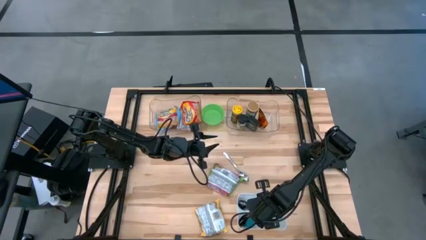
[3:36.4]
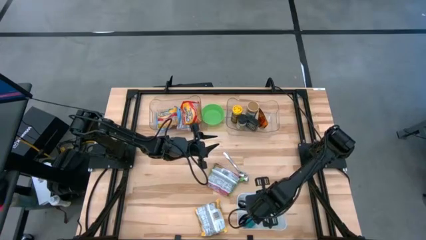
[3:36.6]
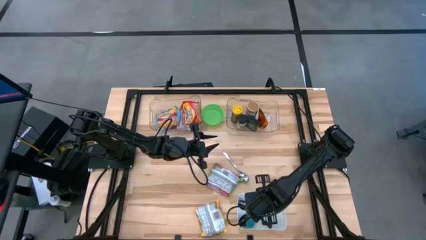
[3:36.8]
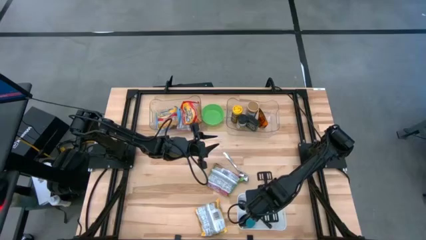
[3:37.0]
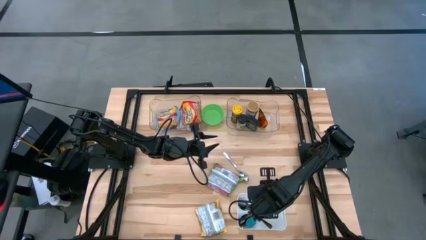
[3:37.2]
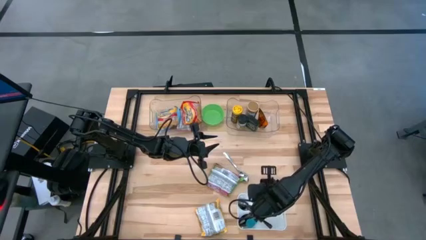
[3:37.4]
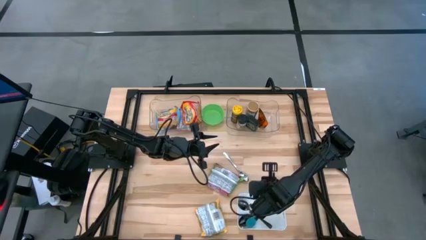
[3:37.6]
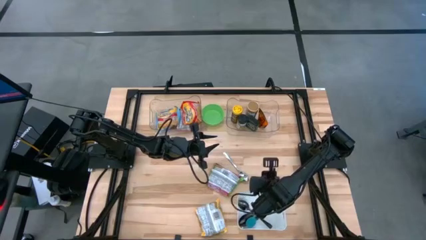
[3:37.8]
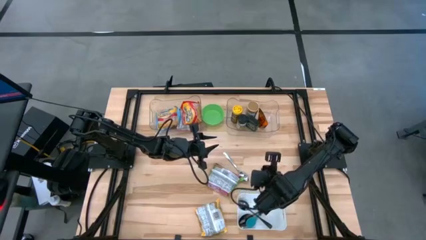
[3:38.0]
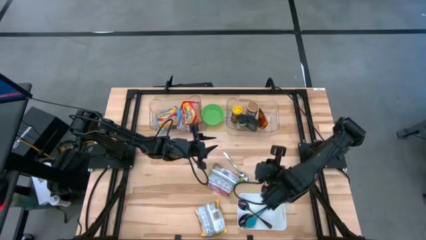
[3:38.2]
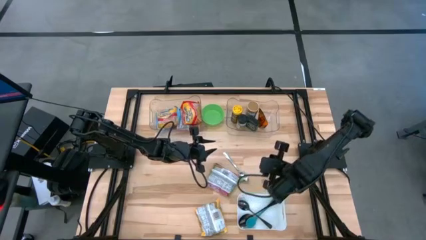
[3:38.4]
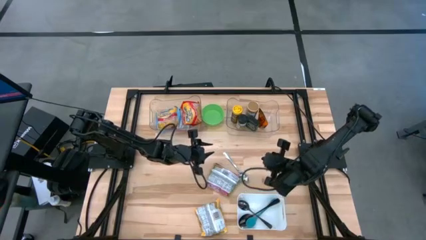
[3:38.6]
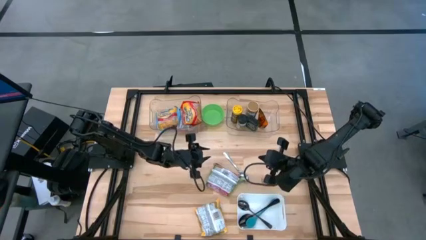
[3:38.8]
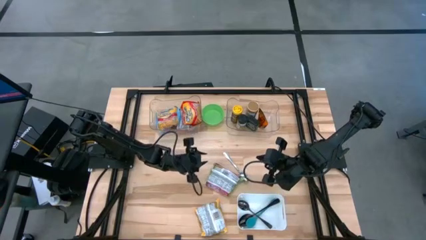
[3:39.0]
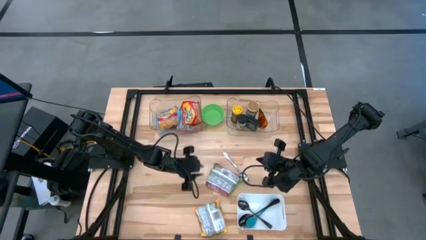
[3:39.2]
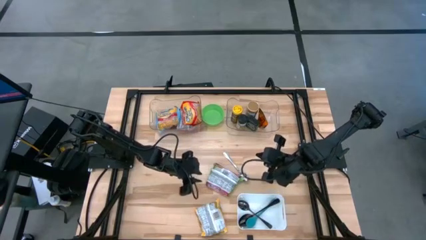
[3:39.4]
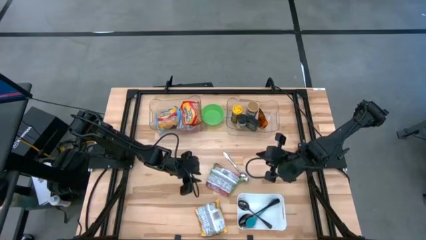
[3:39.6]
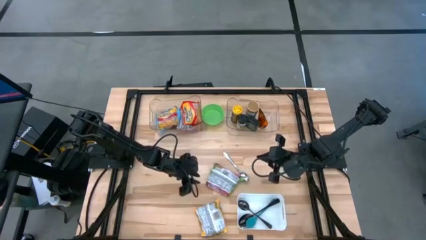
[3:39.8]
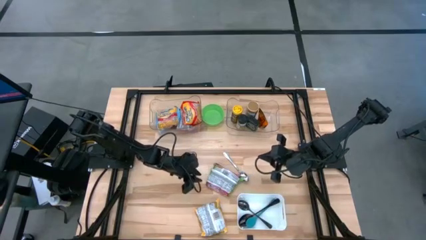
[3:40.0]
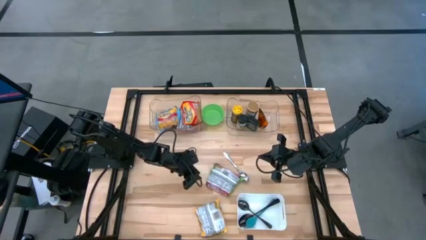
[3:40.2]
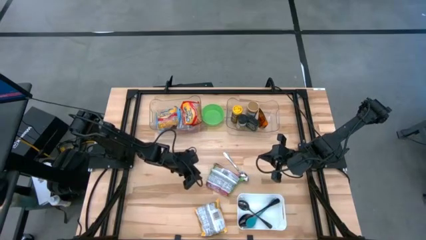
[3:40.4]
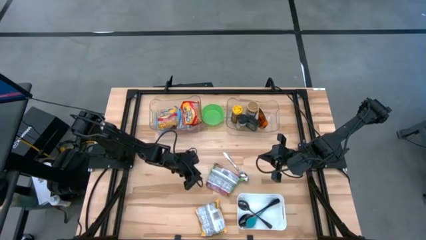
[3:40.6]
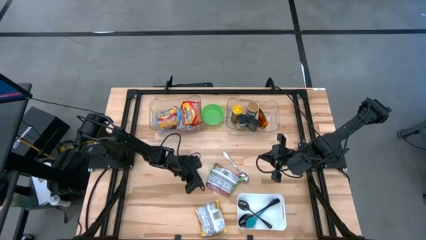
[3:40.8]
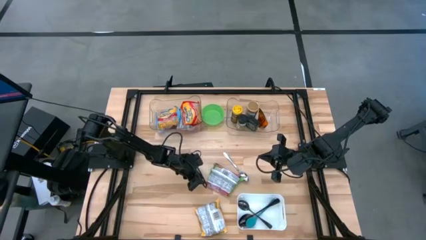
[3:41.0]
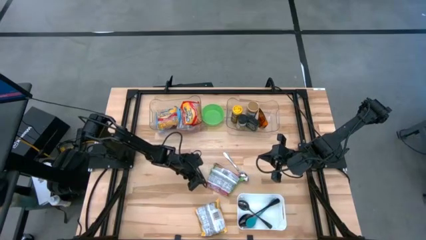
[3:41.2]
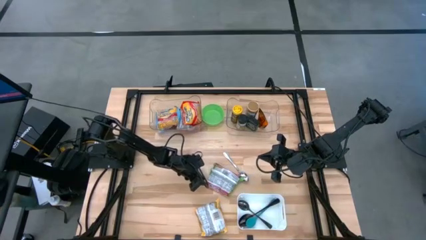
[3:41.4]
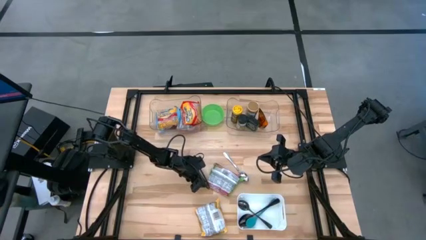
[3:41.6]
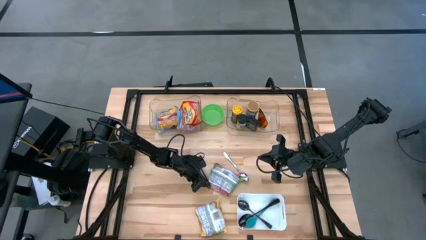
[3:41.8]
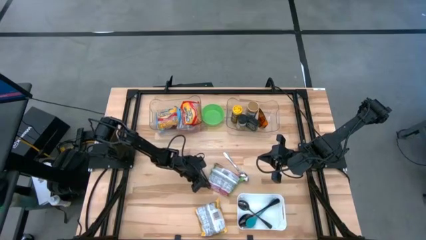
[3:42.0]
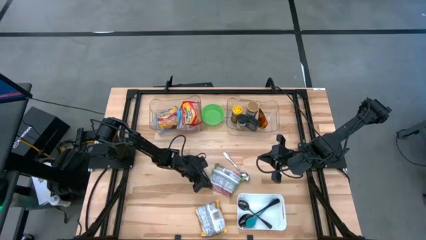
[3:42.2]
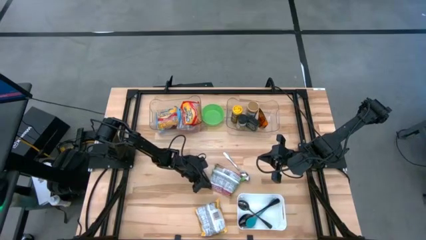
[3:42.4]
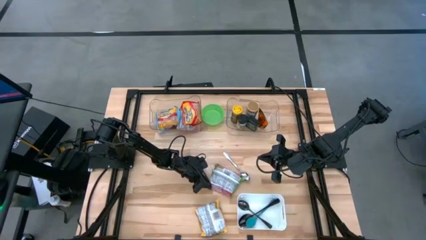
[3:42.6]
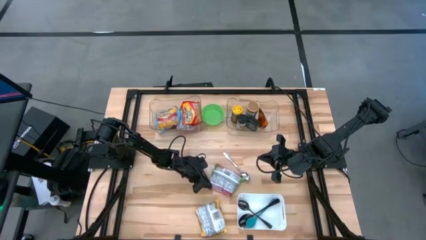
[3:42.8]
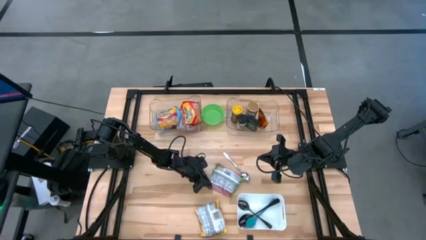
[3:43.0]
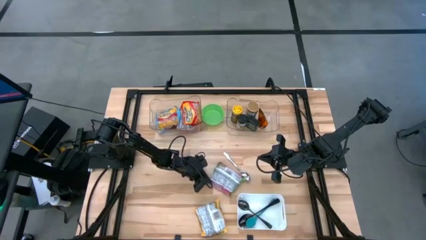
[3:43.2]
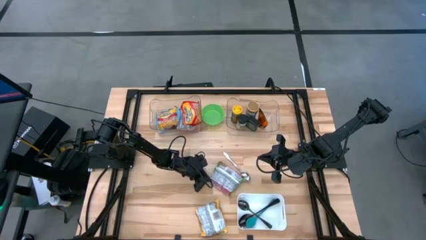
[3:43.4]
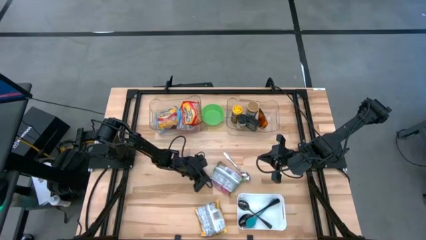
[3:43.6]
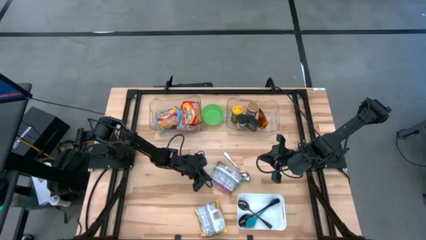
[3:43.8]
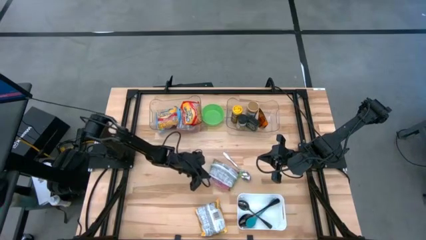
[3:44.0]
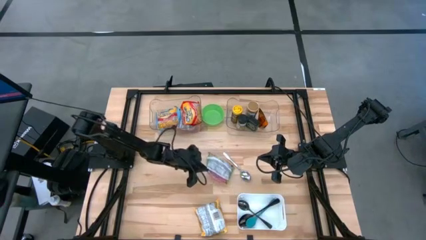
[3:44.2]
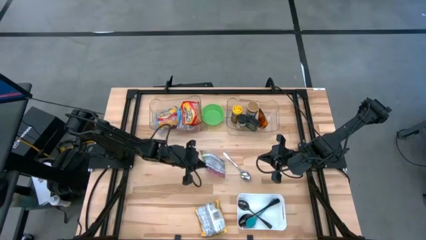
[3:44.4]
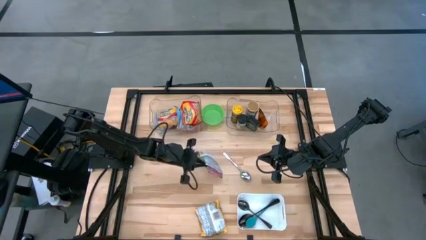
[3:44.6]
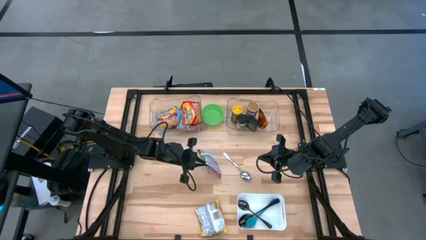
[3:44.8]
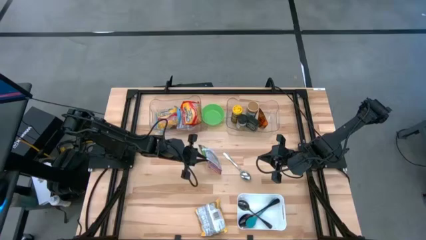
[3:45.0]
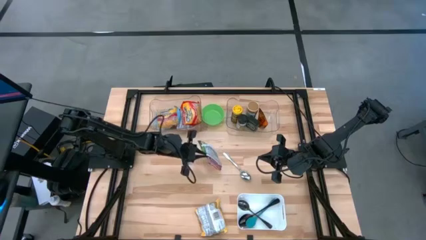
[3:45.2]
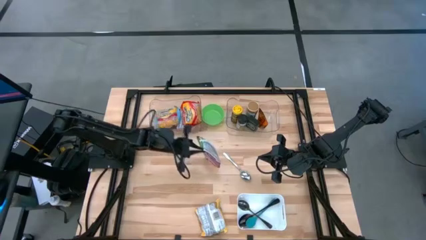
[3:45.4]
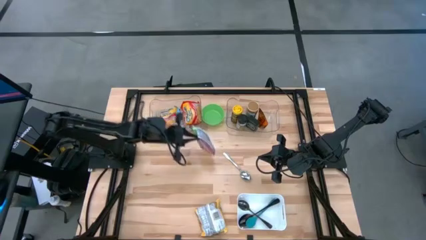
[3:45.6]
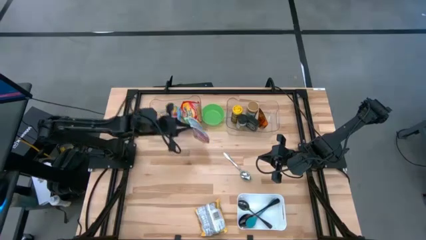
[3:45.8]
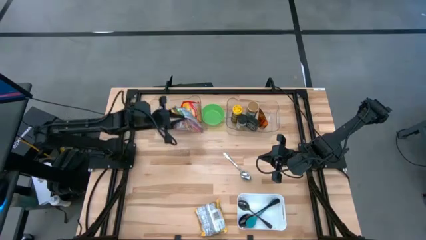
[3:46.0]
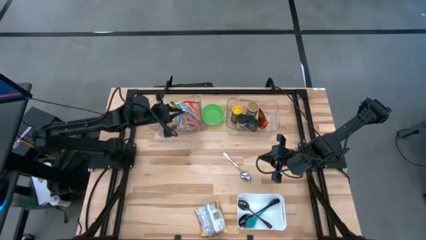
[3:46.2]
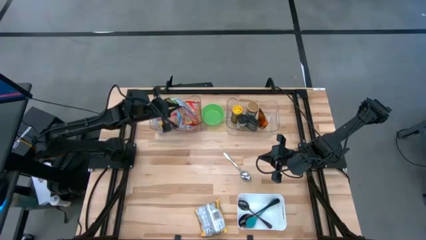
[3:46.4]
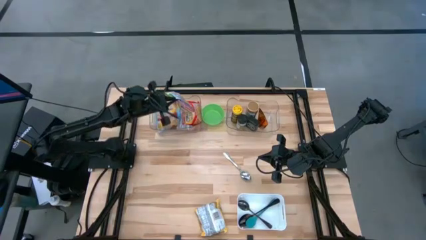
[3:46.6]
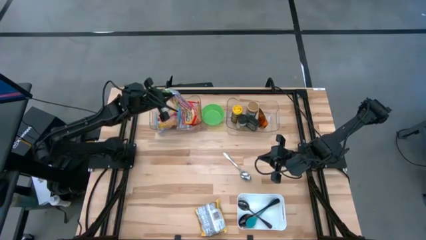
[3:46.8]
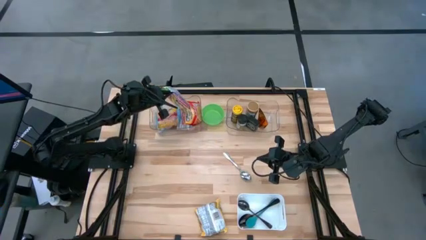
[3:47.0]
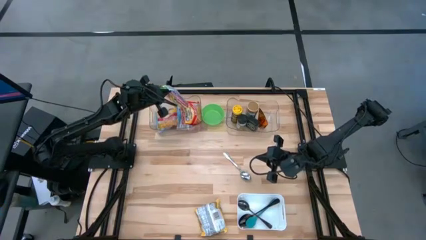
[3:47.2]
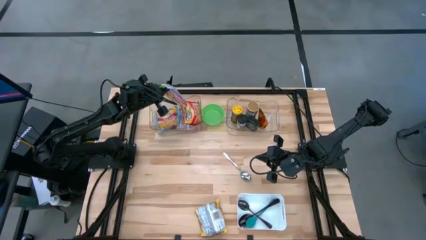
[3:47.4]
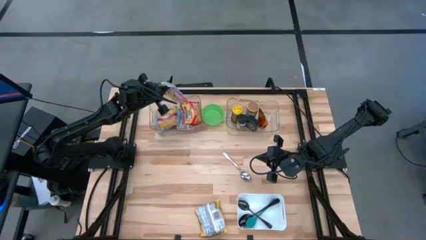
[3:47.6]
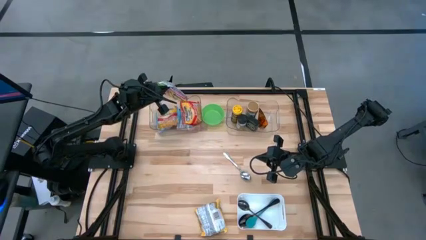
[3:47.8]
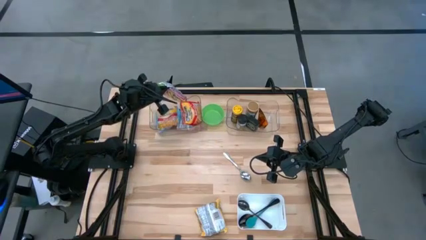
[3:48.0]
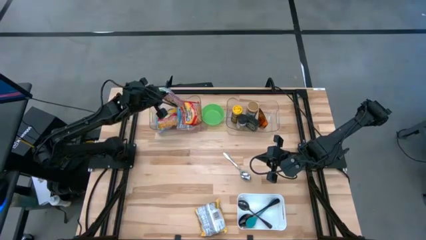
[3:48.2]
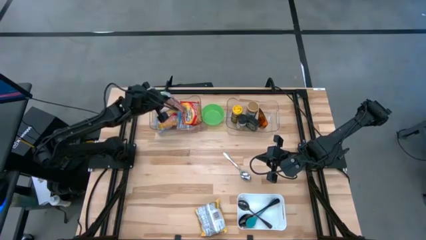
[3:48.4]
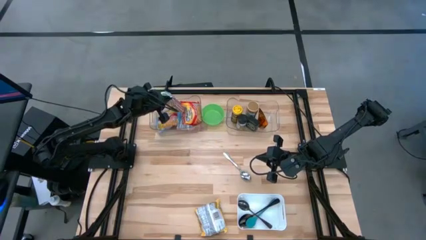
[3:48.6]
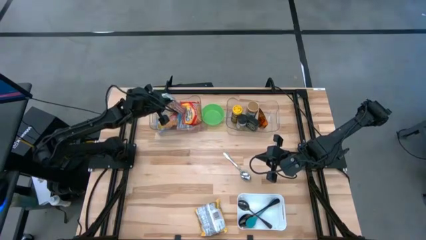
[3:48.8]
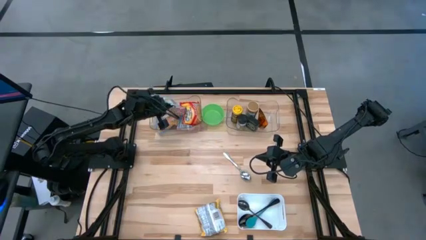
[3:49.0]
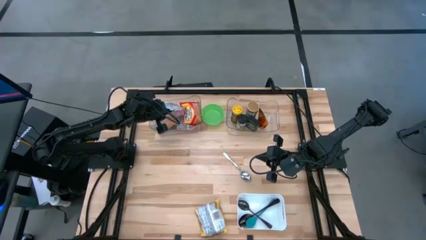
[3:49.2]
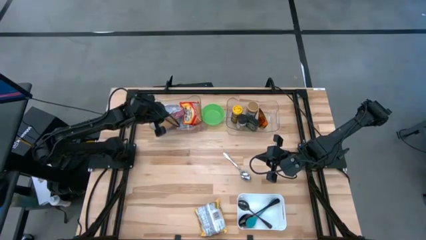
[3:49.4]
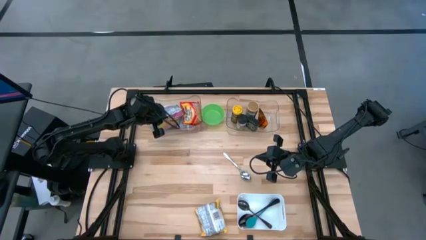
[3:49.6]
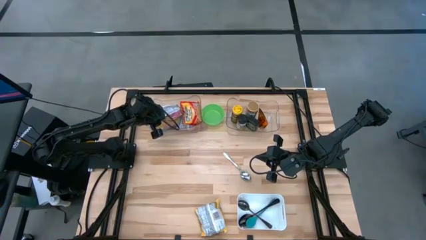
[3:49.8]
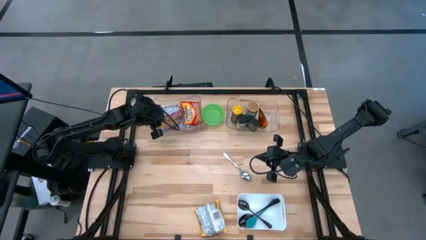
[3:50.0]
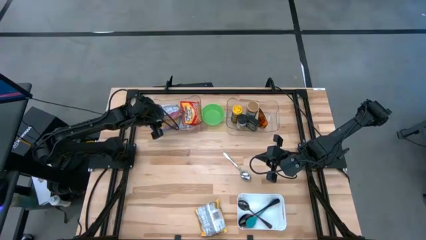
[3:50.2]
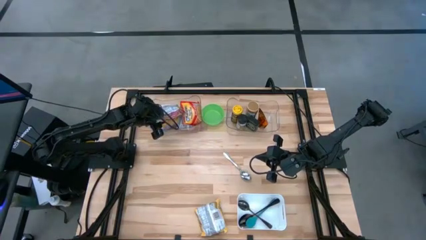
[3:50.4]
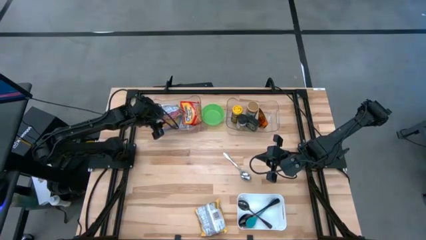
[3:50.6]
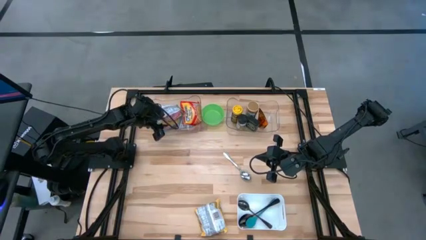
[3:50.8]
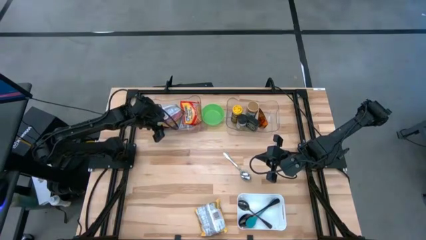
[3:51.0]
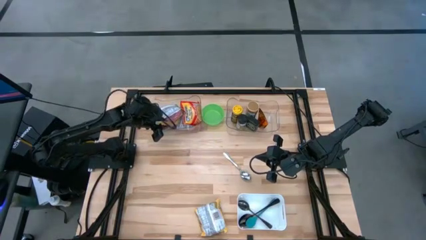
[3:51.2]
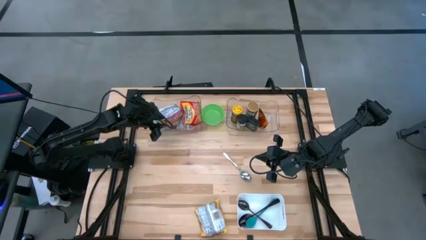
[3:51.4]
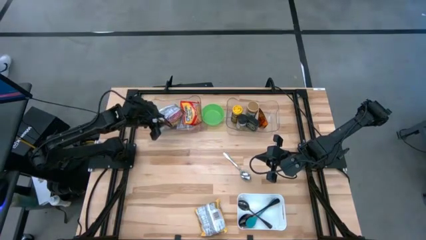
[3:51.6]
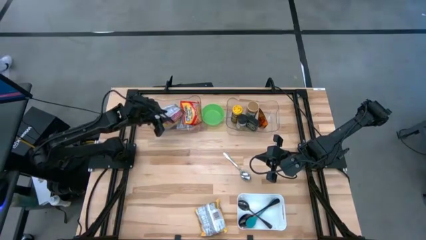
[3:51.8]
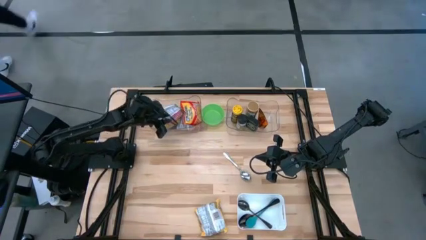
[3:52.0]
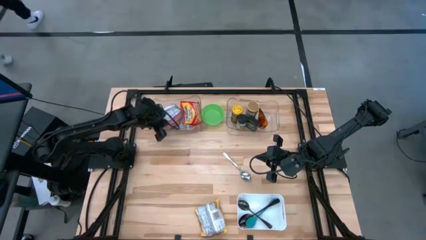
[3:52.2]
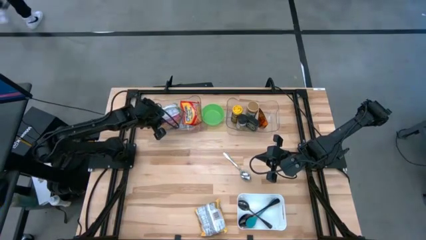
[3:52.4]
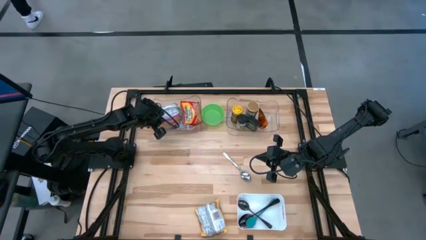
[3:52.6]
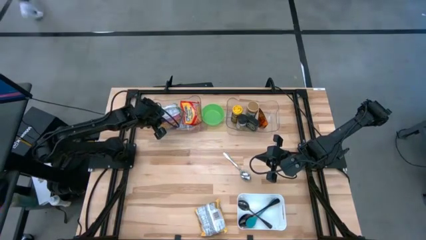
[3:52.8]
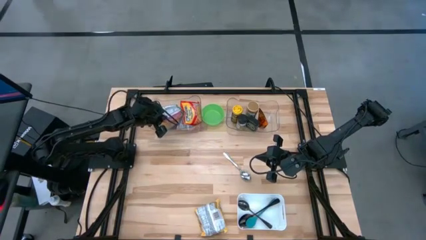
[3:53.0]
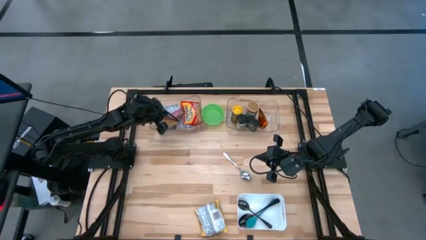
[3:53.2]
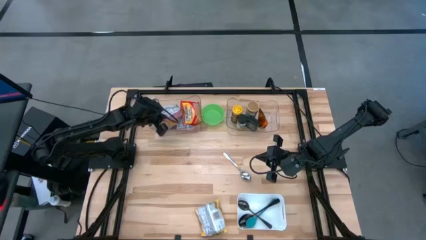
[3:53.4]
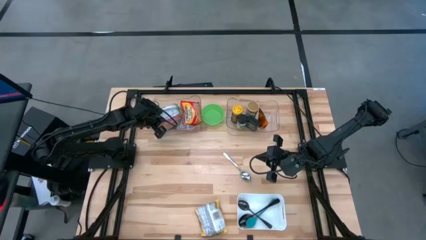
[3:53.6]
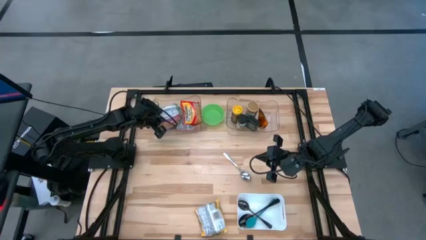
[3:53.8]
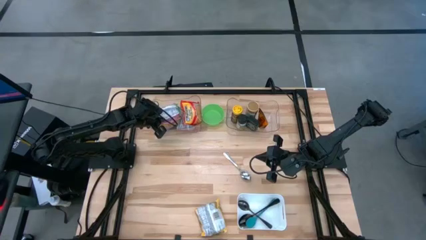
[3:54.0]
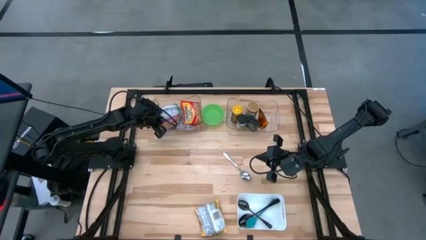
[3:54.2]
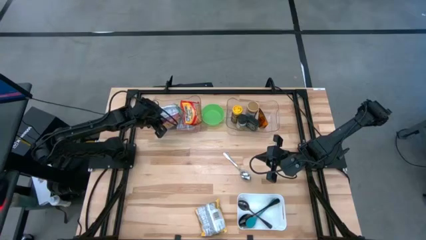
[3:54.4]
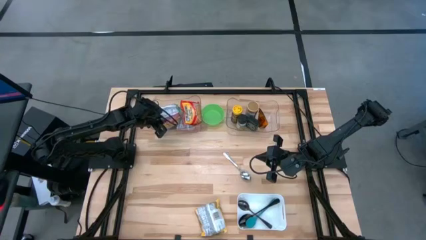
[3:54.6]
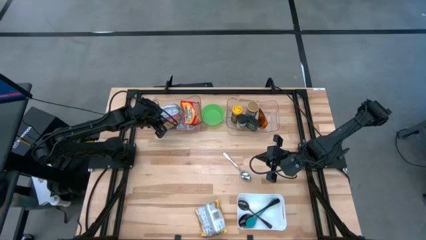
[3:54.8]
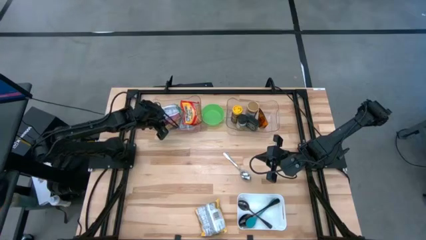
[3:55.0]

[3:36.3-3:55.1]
Task: Pick & Place Food Item
Put the green and red noodle pack in the left transparent bin
